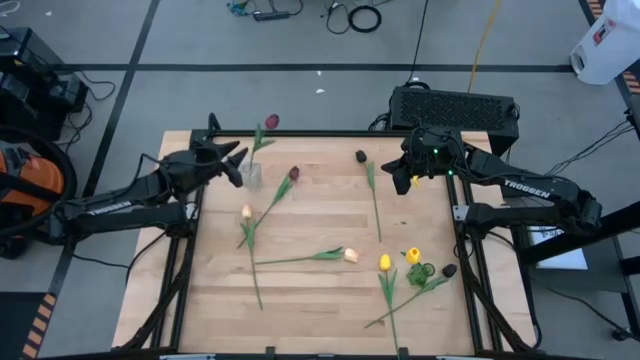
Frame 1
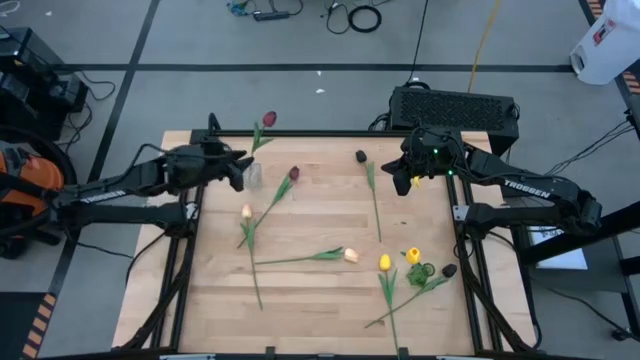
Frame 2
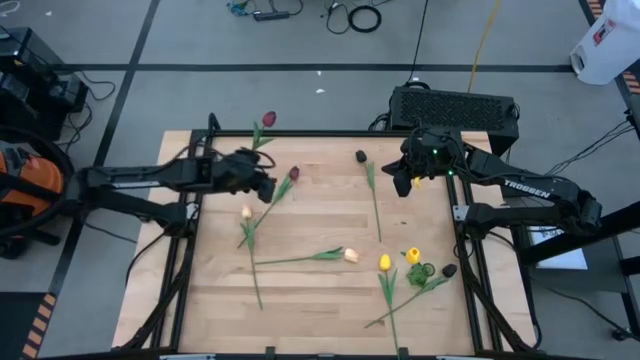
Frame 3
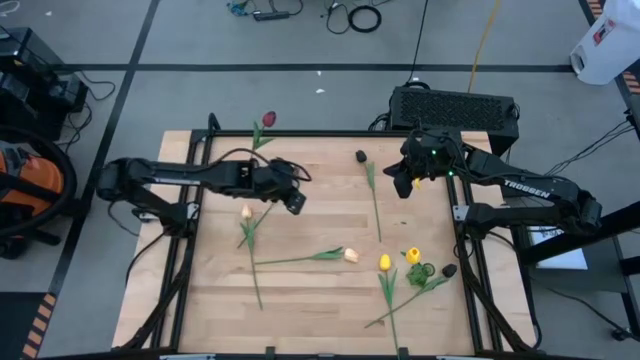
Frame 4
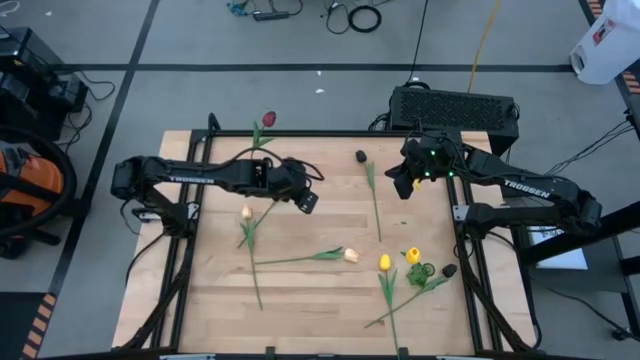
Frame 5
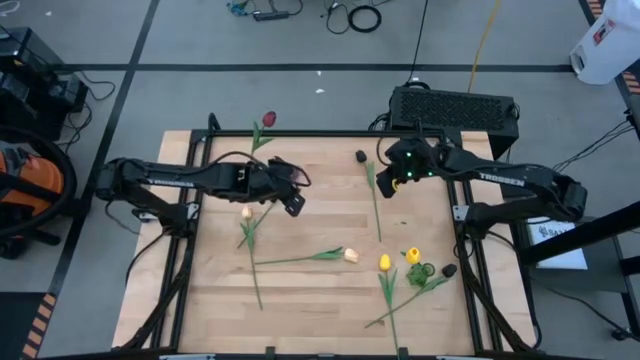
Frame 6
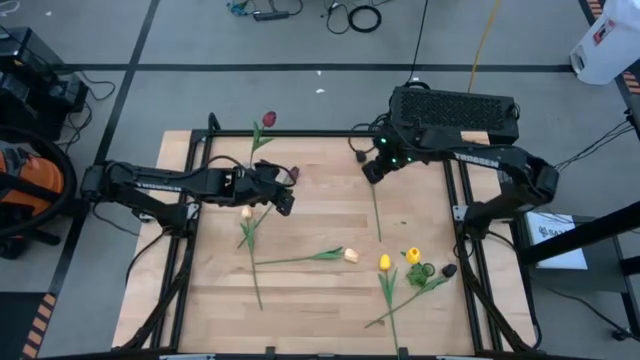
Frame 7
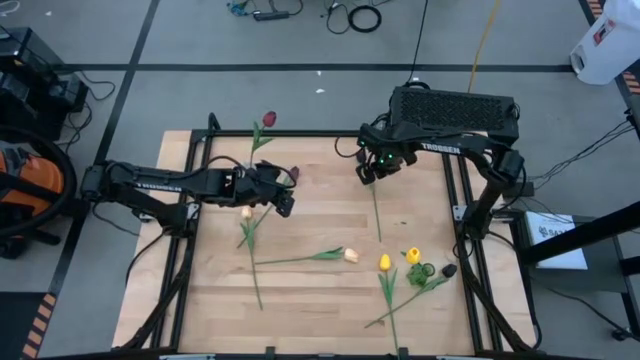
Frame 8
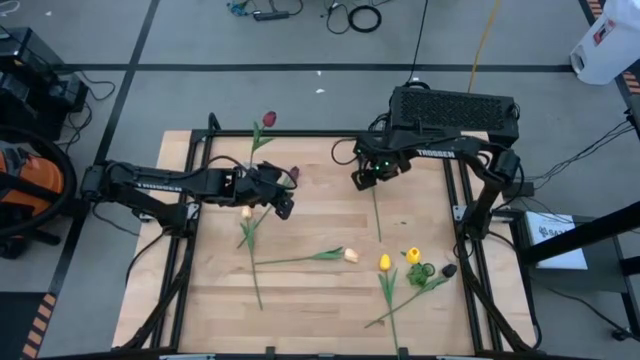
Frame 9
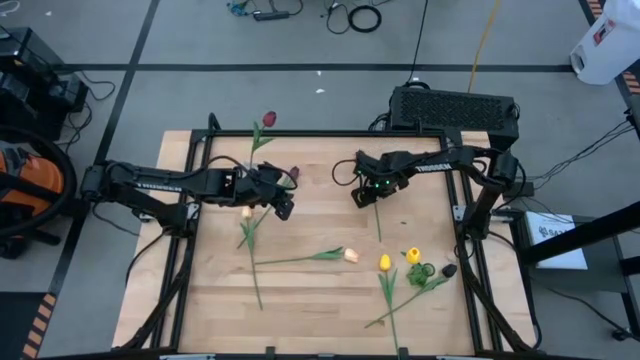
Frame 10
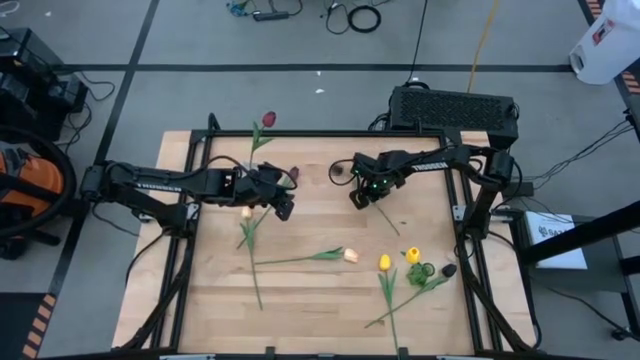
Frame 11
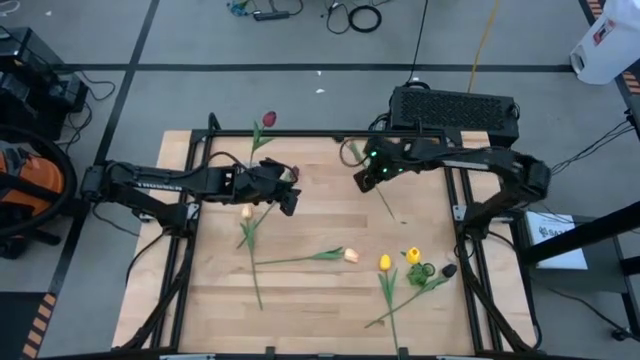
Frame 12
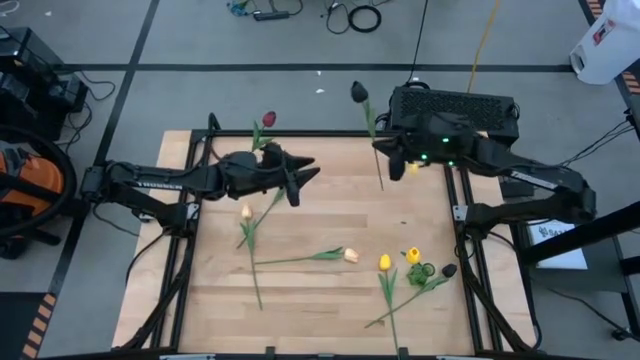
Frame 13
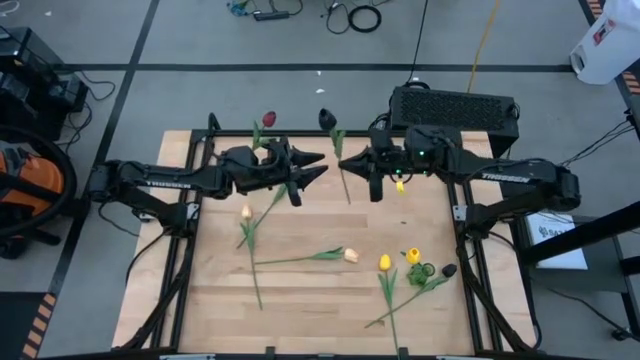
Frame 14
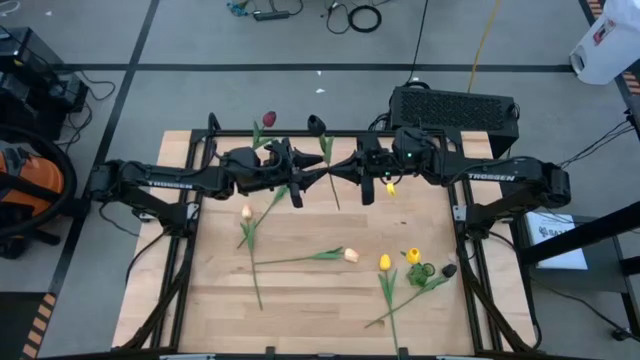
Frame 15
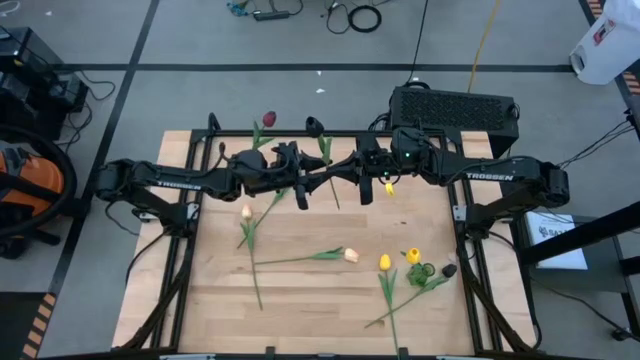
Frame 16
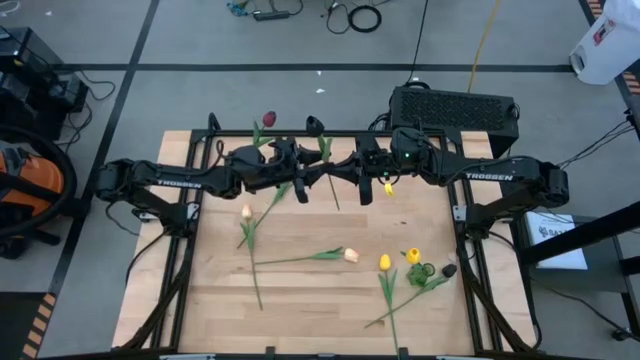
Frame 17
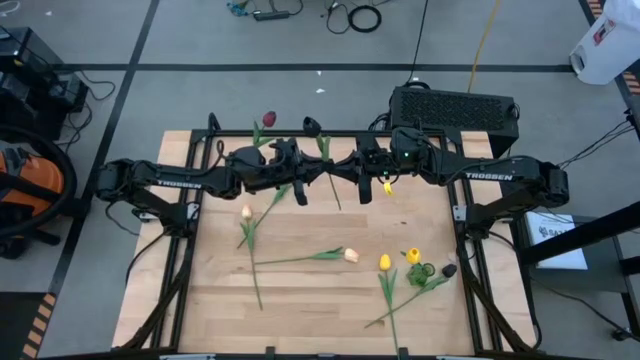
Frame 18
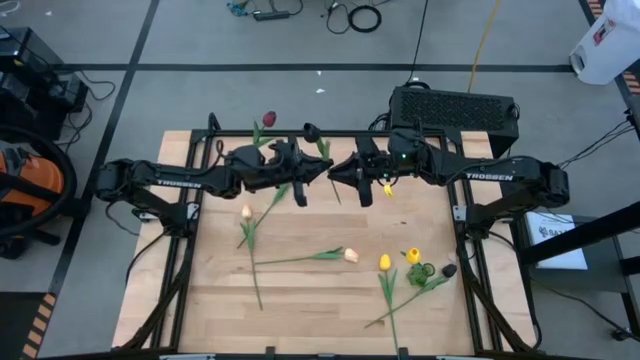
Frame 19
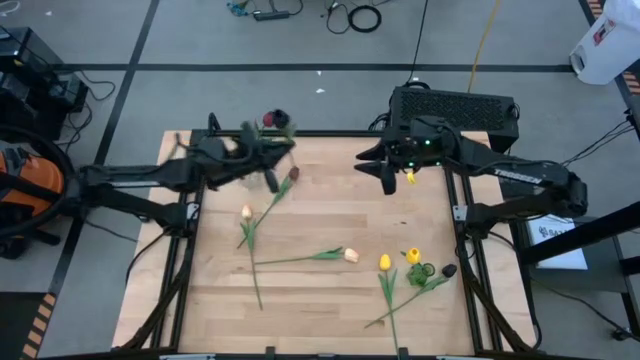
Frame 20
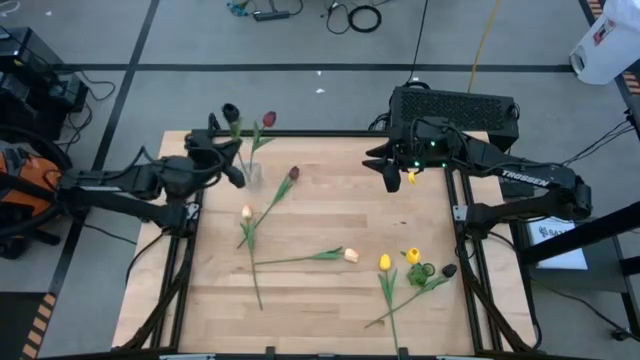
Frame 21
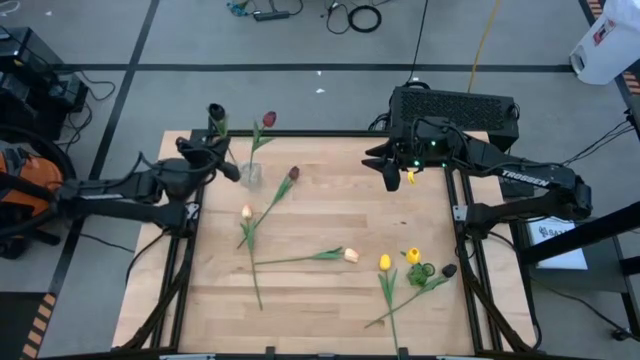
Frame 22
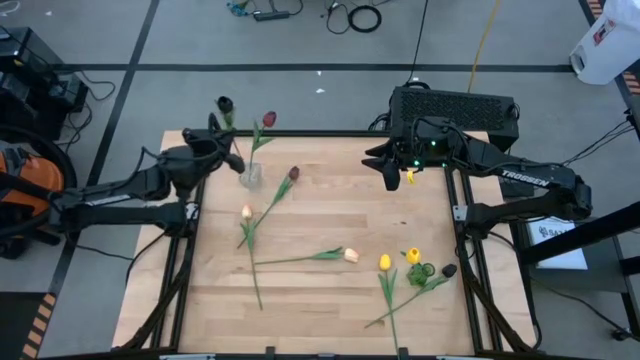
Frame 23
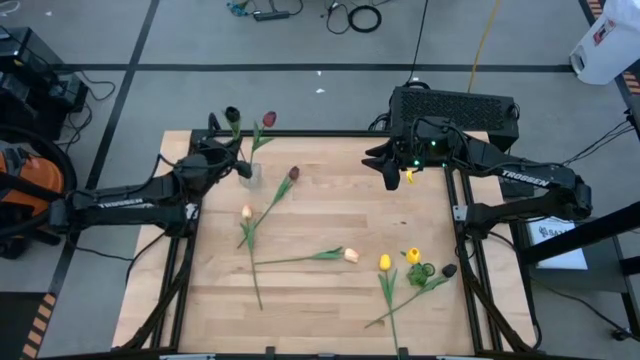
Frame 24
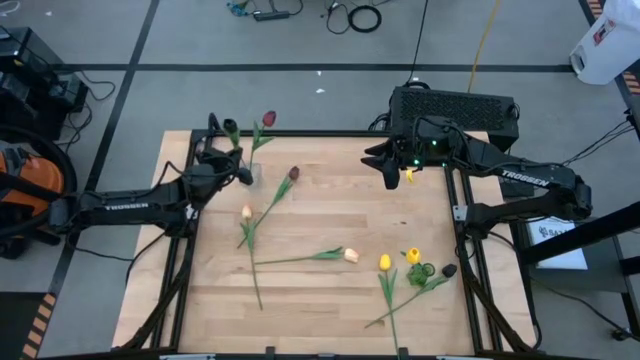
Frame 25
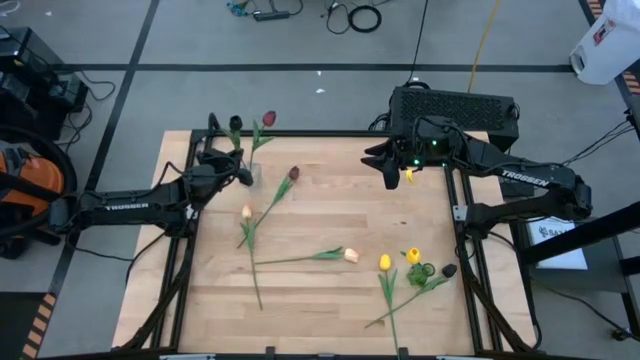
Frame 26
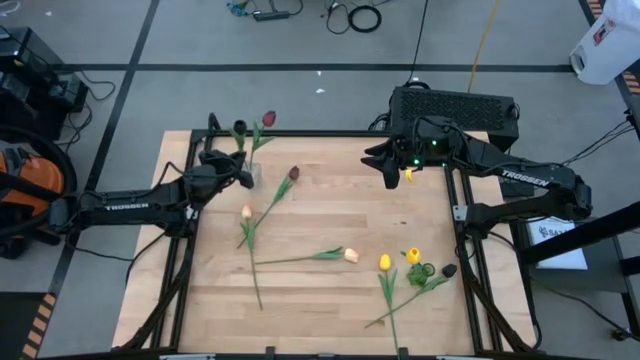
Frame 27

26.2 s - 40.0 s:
Task: Sort flowers into vase by color
Put the top black flower into the transparent vase

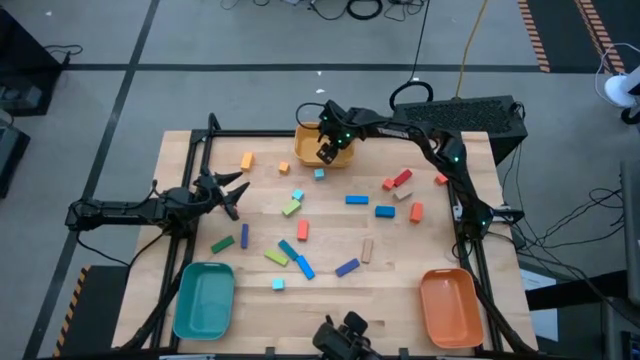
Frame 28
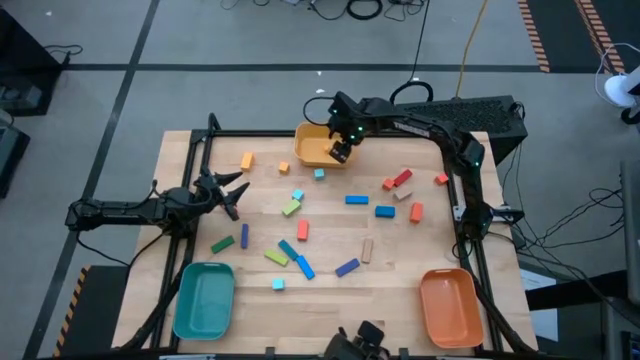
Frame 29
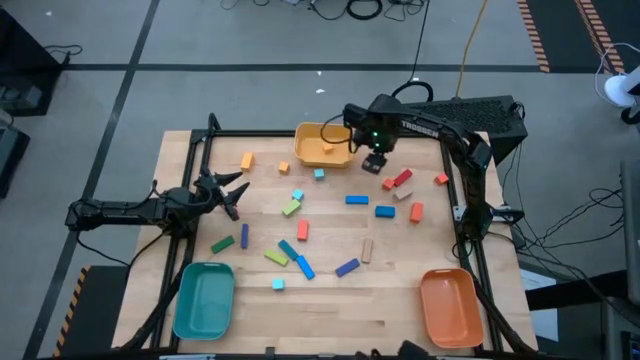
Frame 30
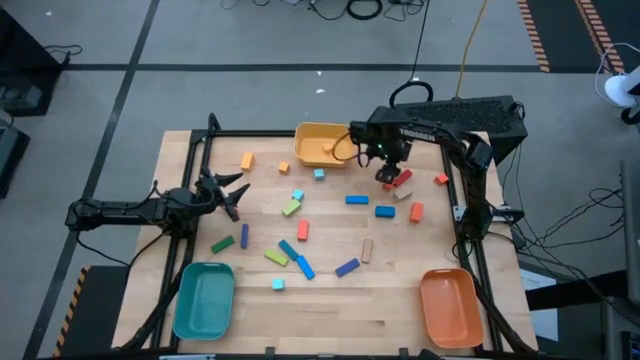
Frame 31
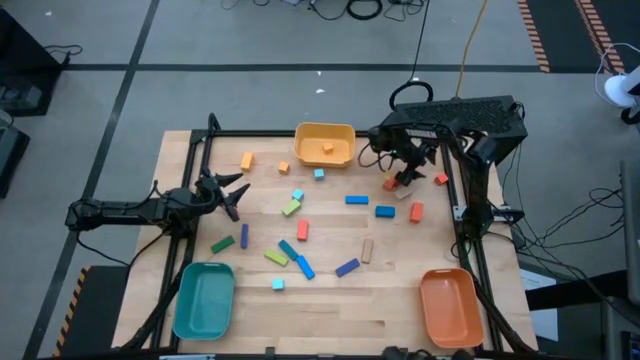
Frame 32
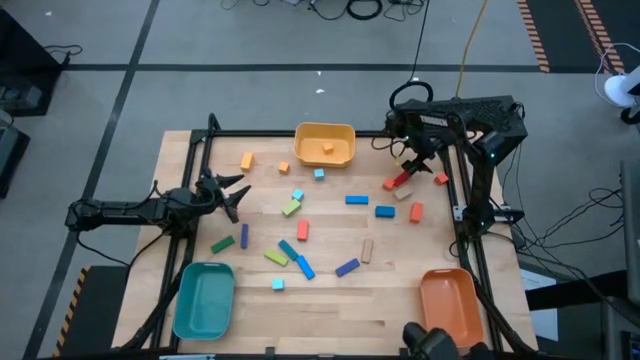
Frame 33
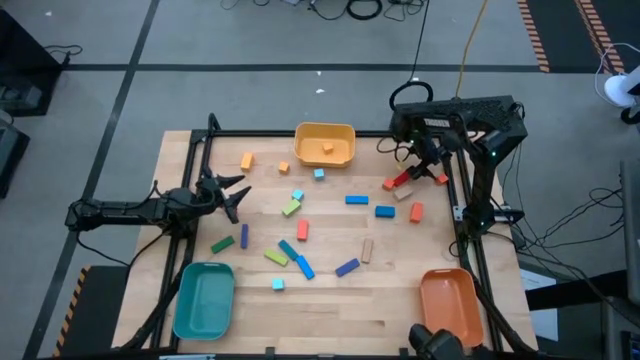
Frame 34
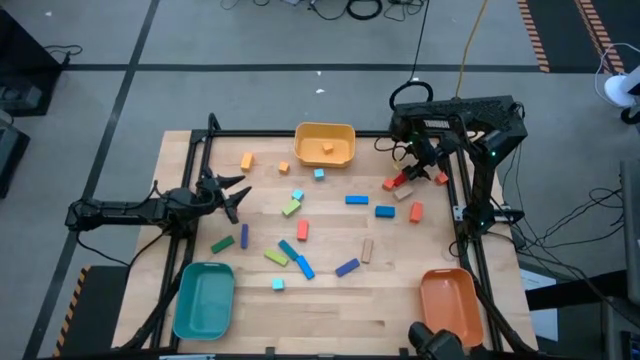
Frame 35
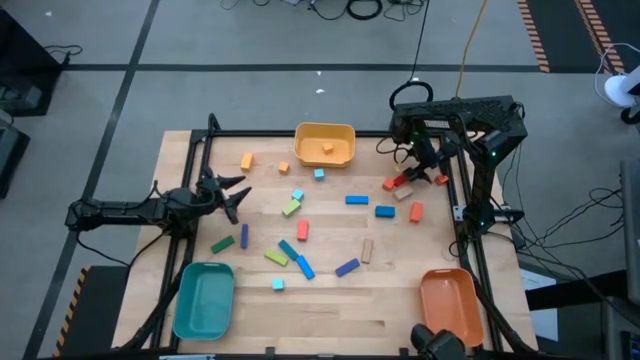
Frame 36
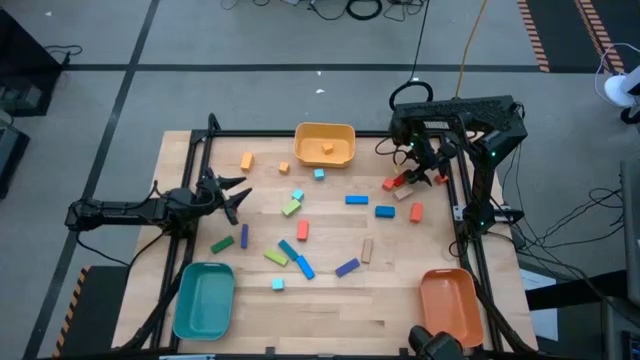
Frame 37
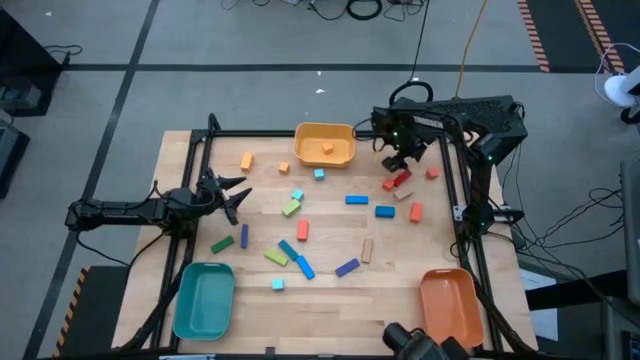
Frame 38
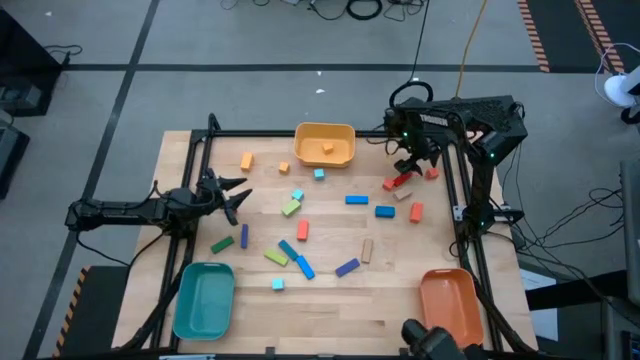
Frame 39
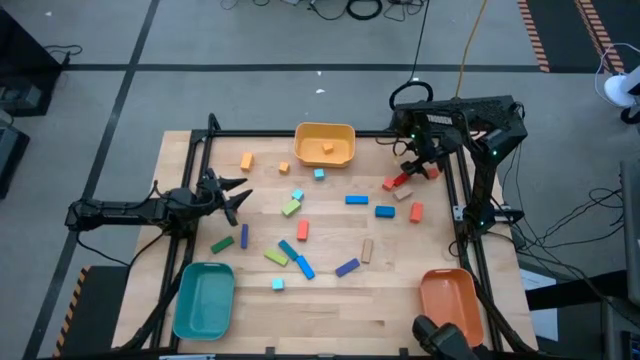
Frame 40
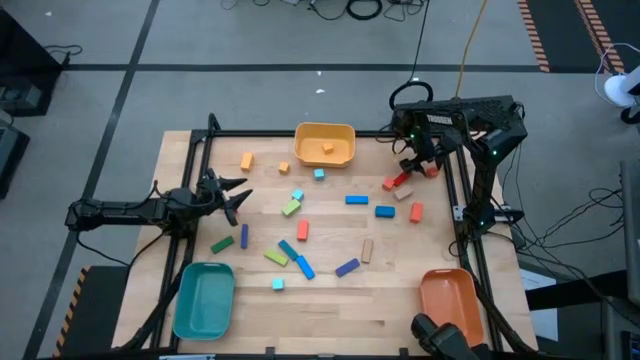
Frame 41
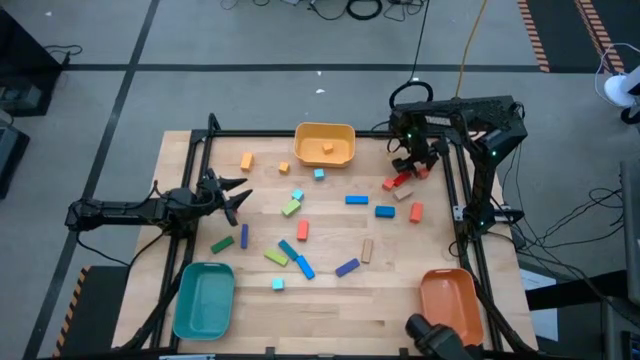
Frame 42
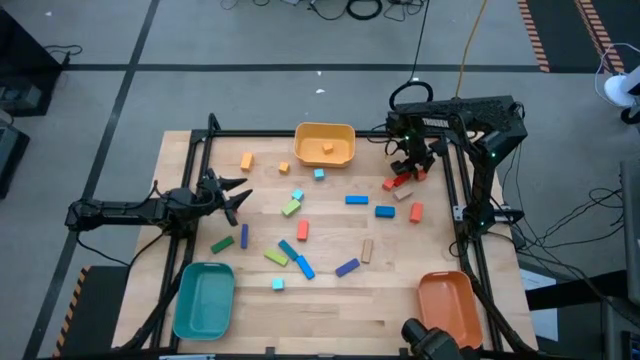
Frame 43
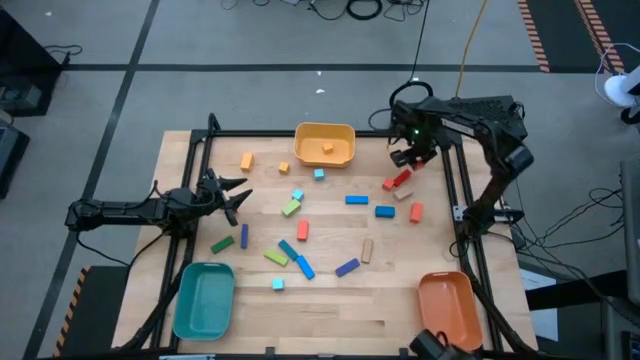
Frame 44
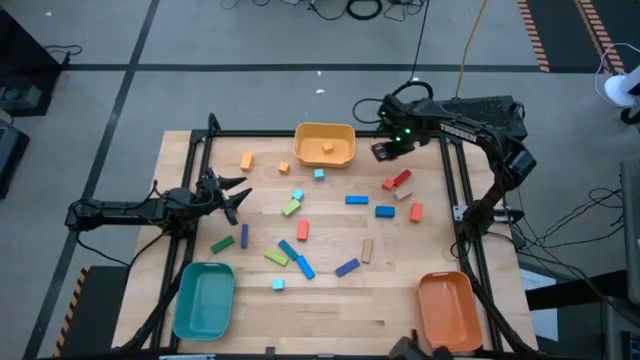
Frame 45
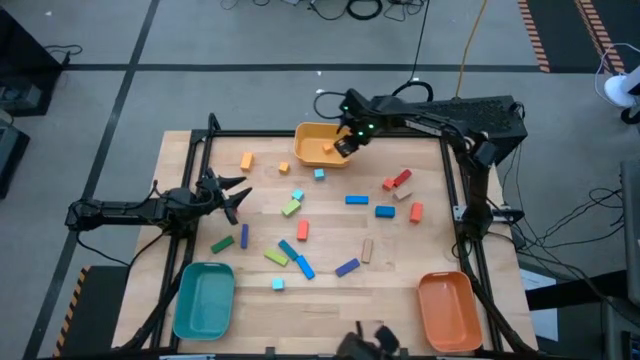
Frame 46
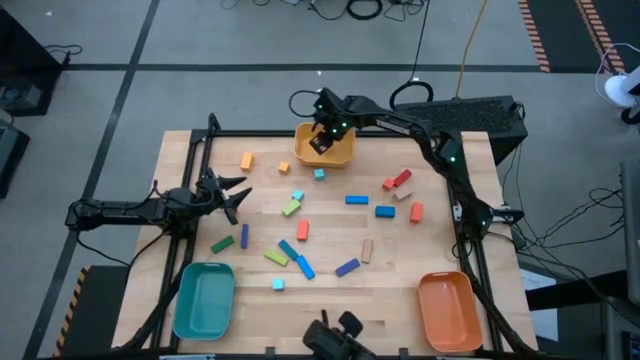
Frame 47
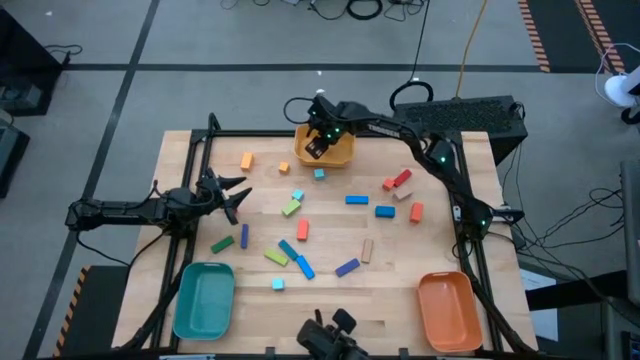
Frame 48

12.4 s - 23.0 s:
Task: Sort blocks by size
Put the right orange square block into the yellow bin
